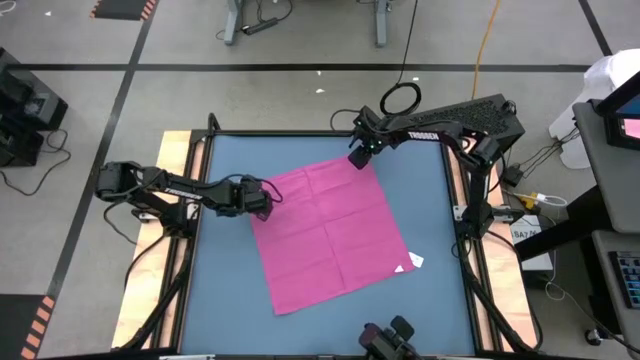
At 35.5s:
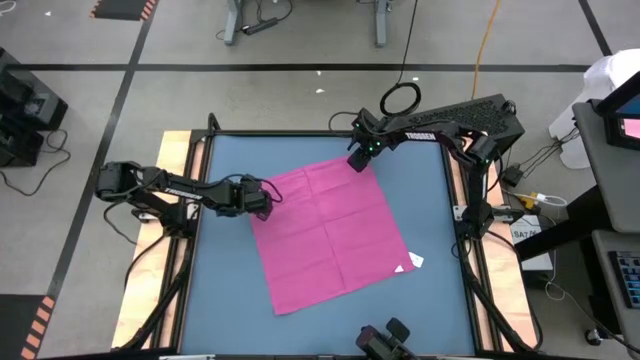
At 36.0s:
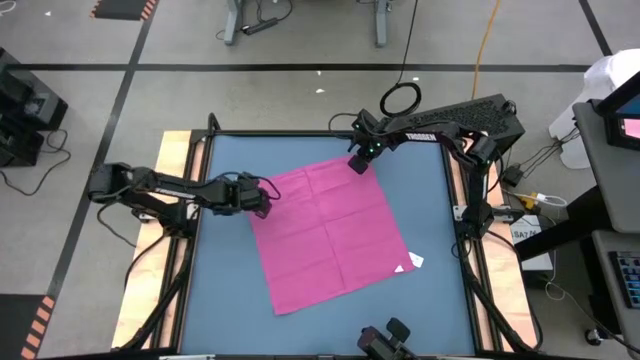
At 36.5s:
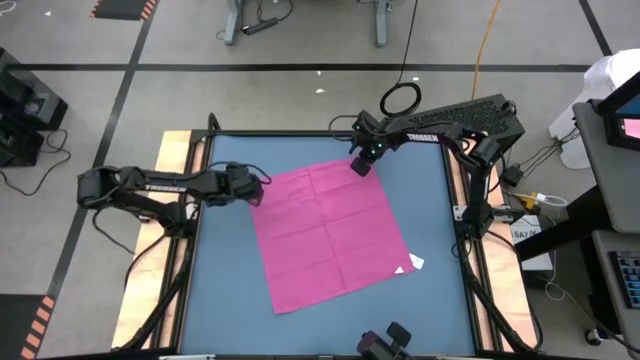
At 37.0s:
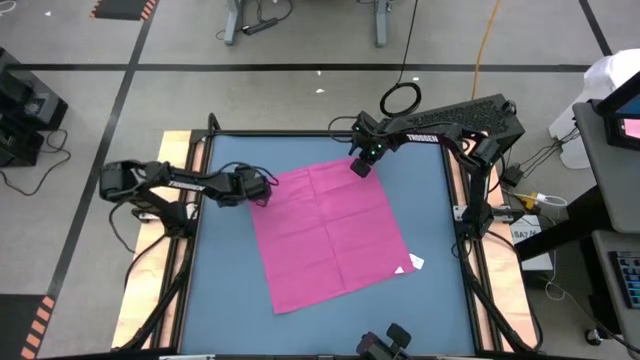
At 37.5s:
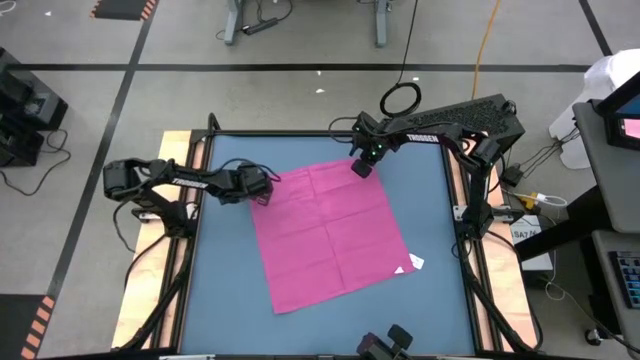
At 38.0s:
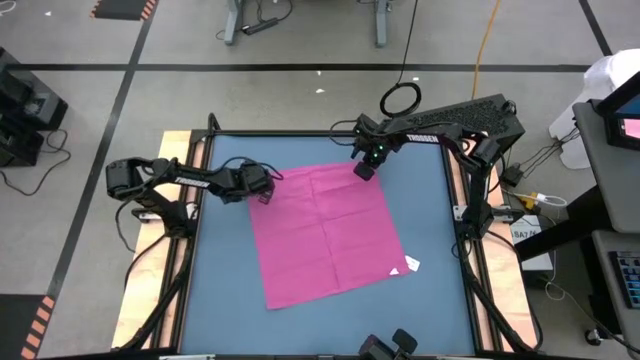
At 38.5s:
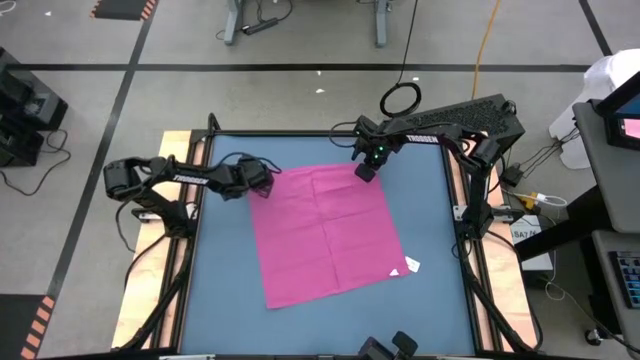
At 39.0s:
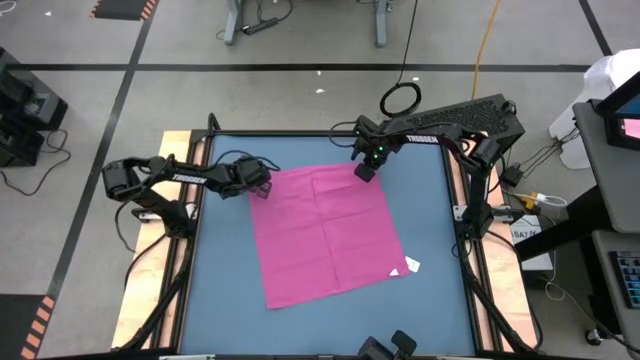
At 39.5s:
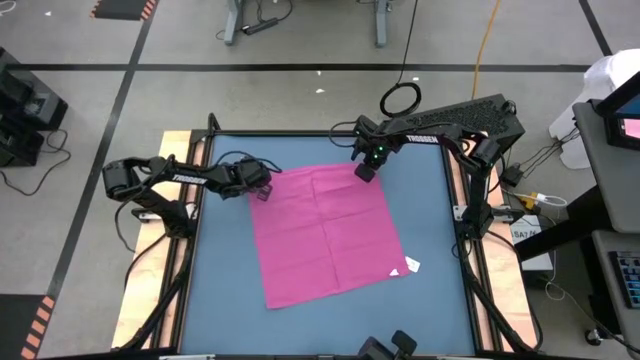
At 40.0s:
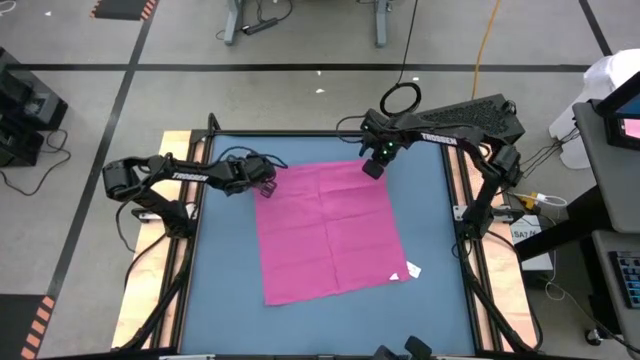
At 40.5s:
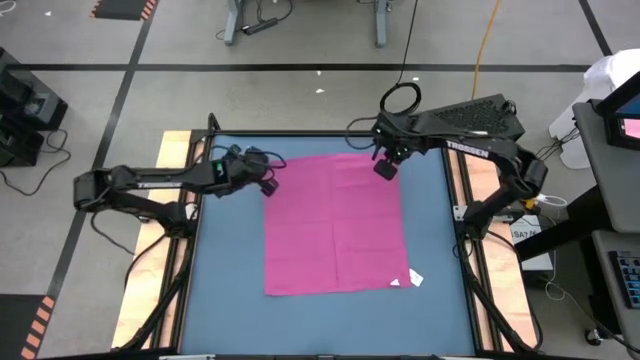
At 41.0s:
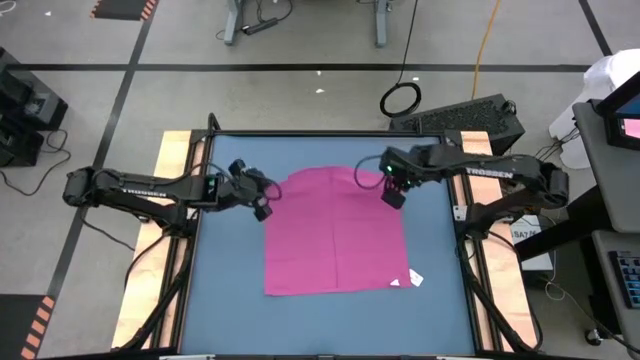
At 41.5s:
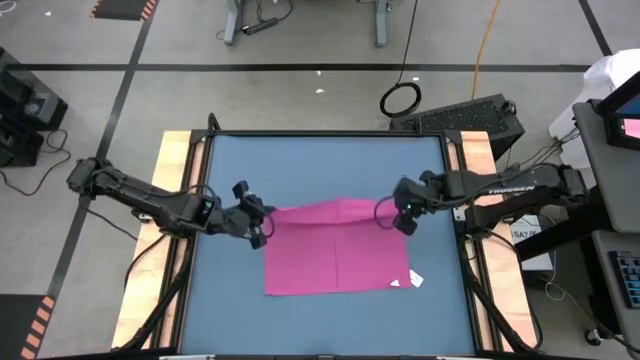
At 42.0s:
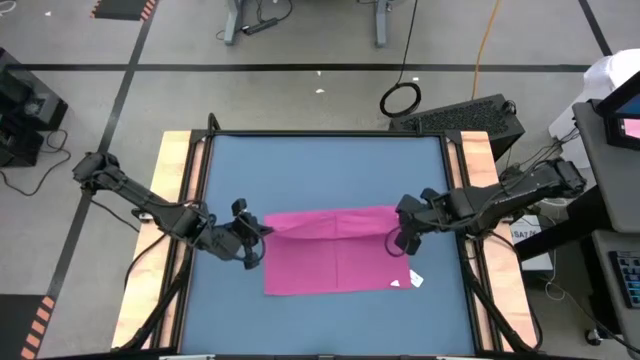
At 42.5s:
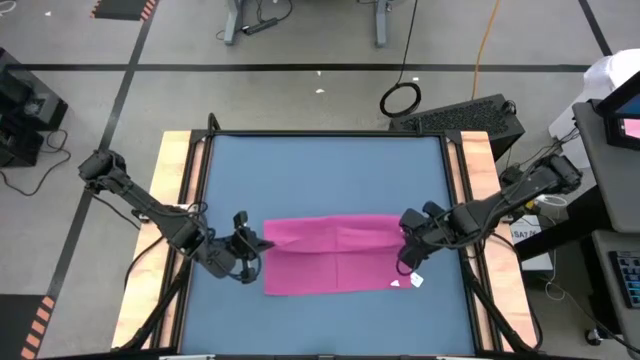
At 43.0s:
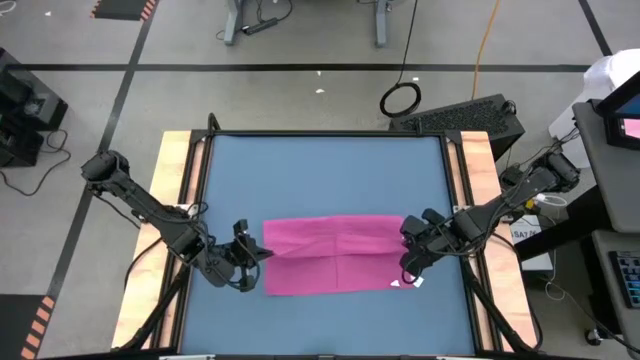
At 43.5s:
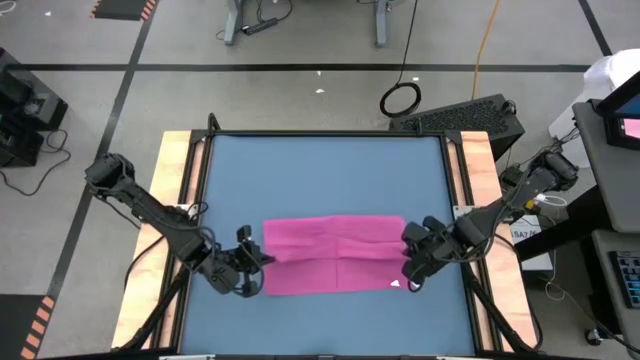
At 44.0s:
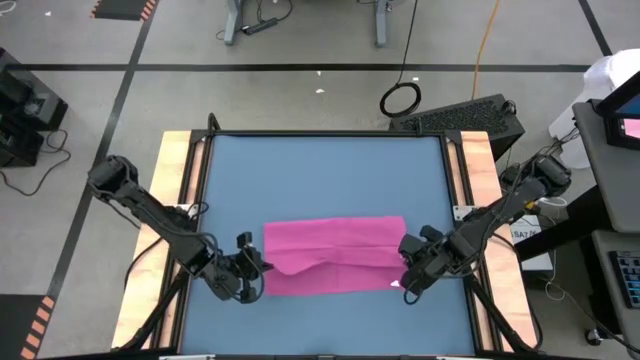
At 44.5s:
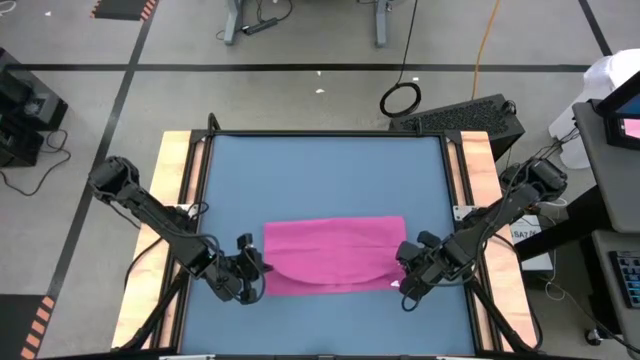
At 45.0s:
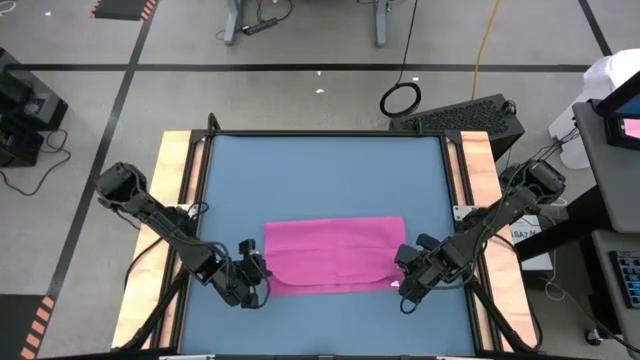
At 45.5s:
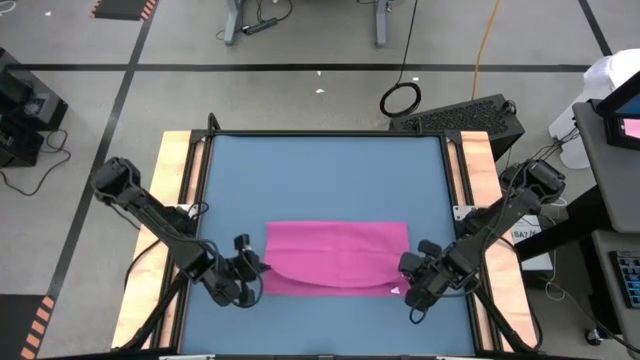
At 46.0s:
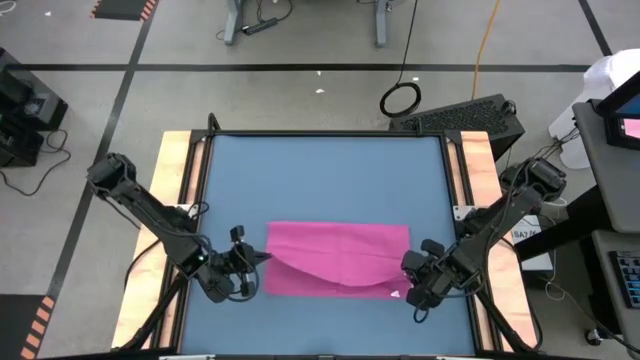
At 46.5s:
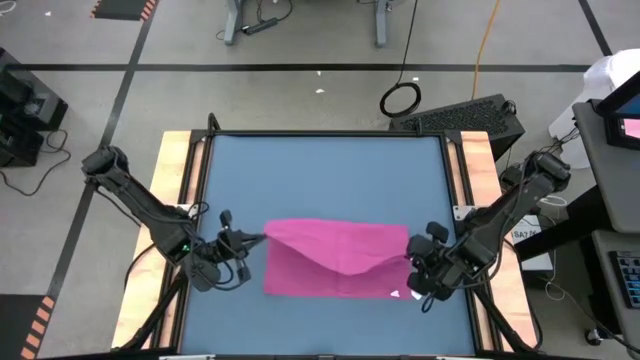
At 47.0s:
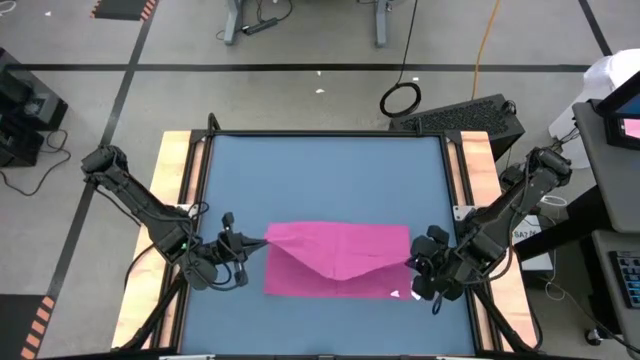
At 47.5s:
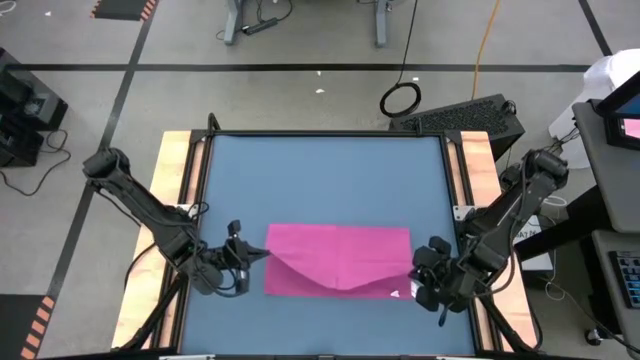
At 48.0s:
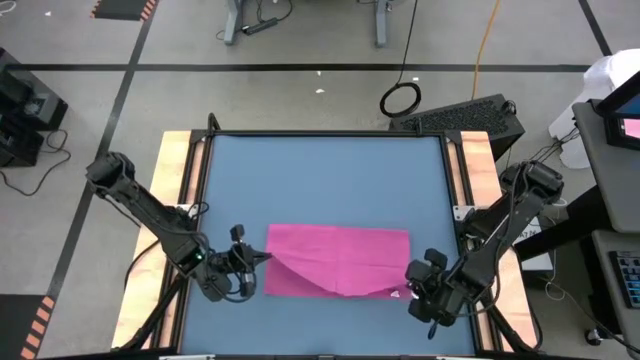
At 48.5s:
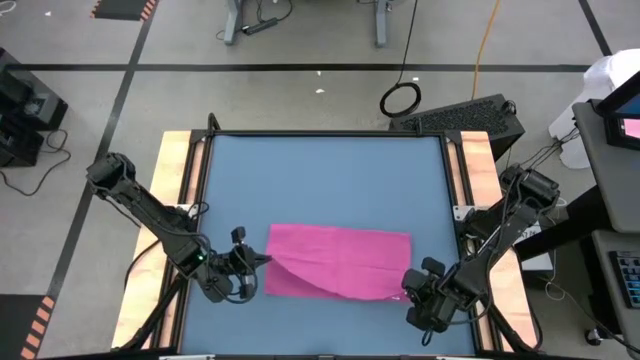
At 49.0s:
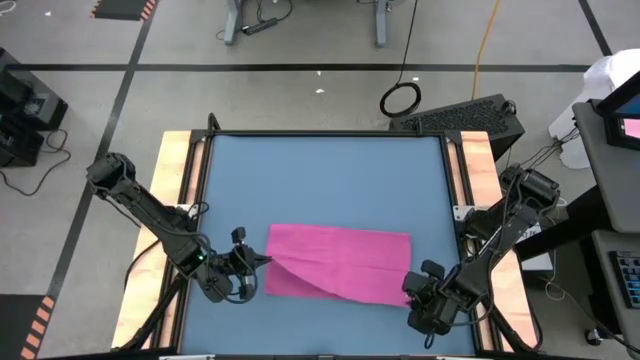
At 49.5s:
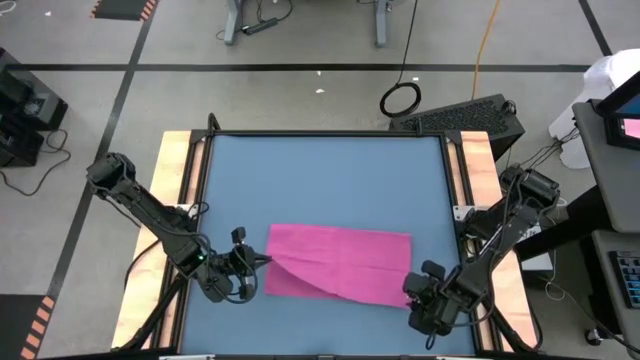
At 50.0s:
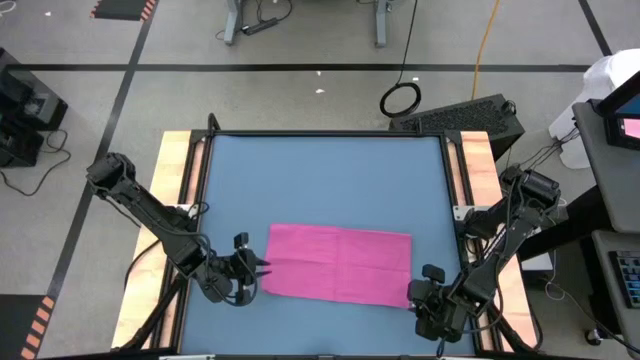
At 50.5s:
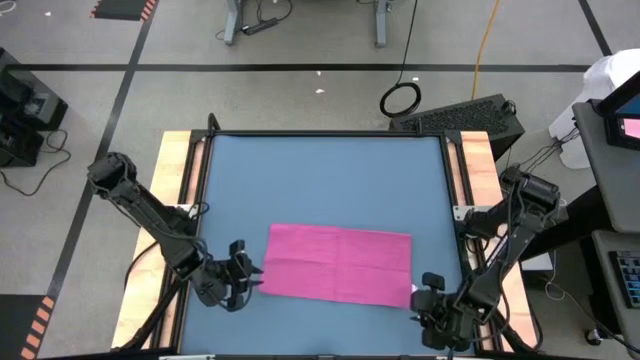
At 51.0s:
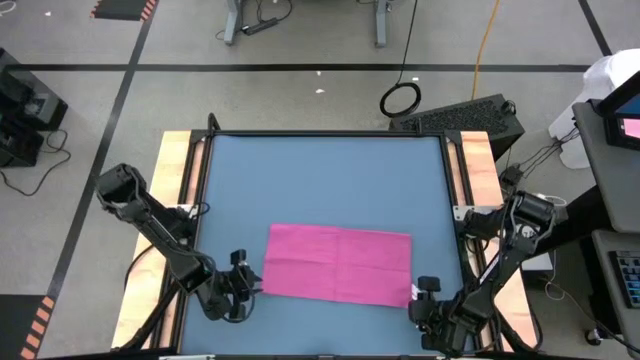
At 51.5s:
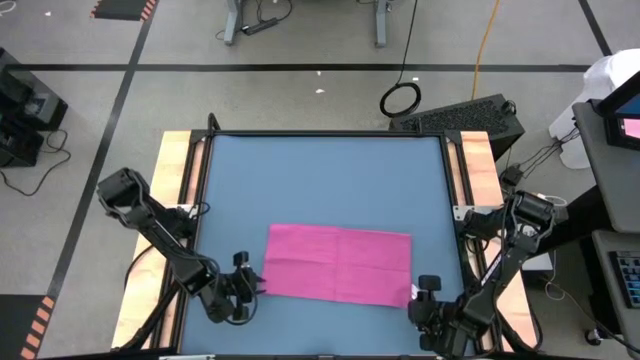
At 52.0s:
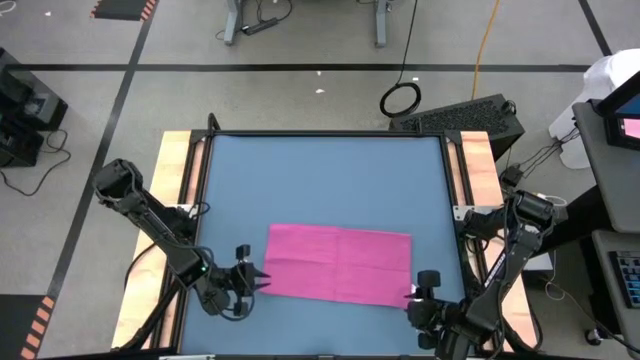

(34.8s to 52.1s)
Task: Roll towel into tight, uniform cylinder
Fold the pink towel

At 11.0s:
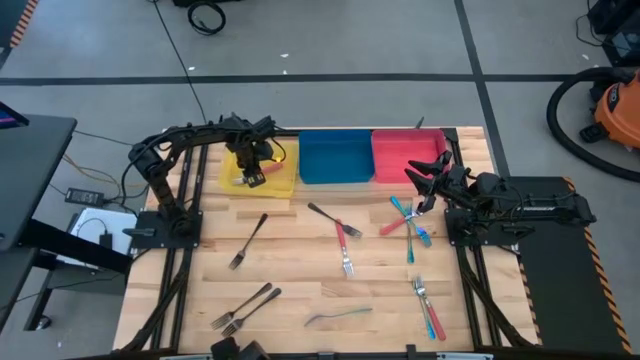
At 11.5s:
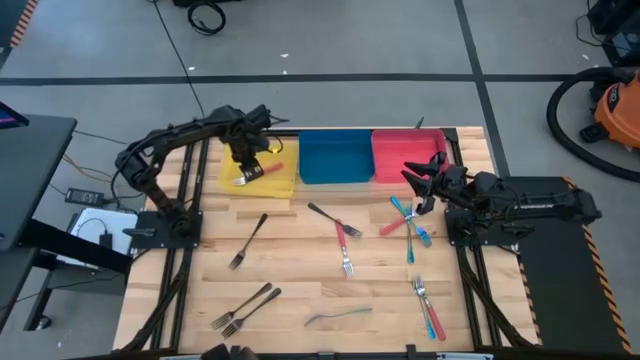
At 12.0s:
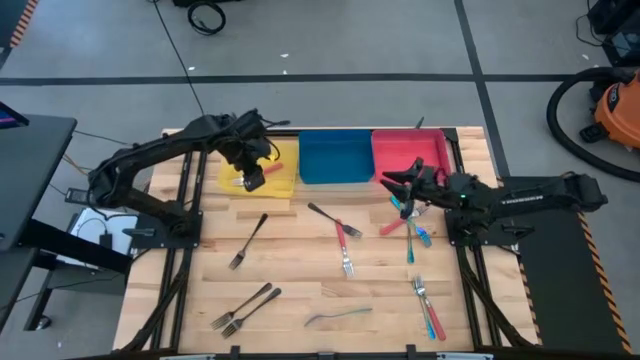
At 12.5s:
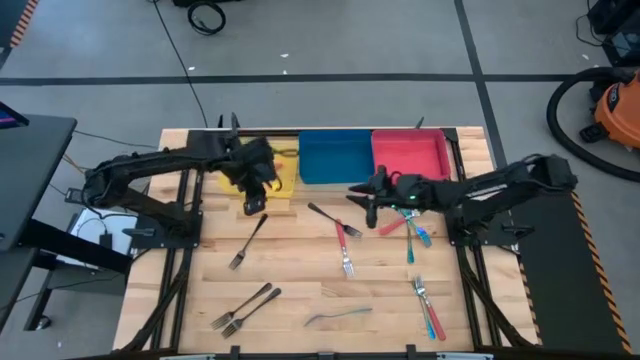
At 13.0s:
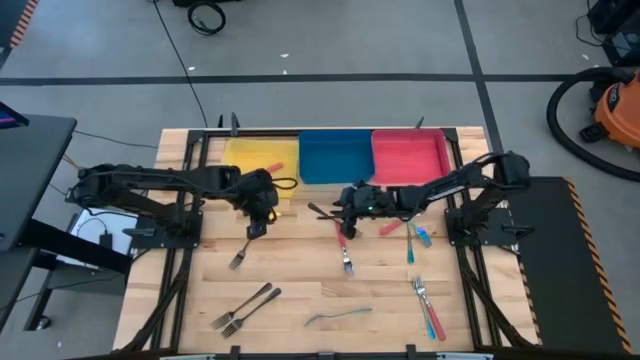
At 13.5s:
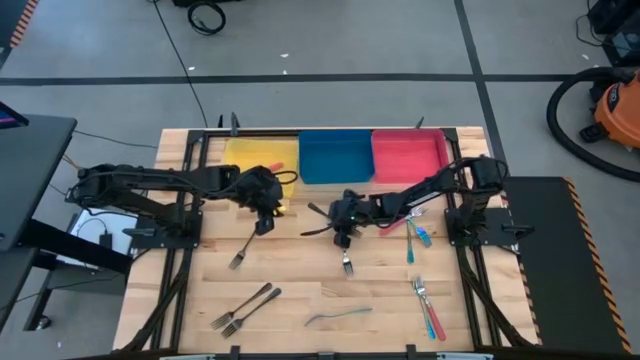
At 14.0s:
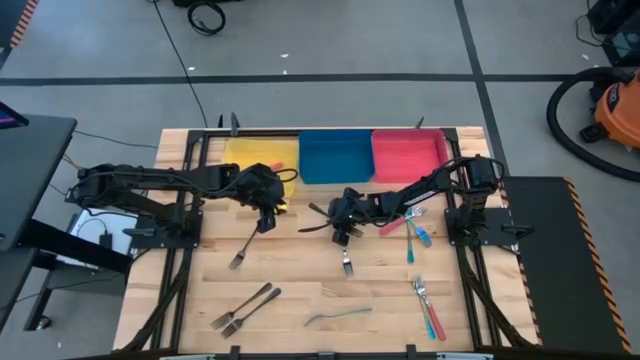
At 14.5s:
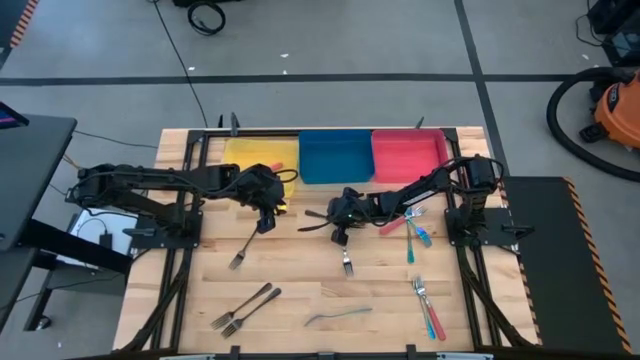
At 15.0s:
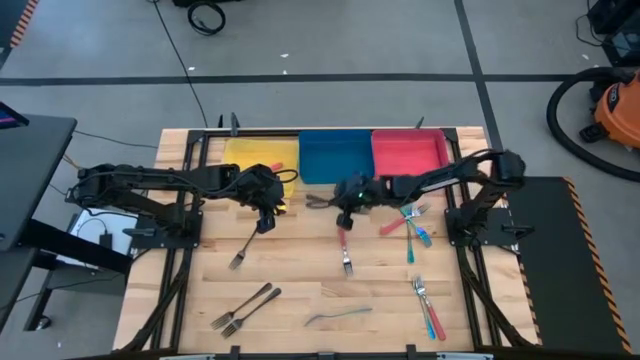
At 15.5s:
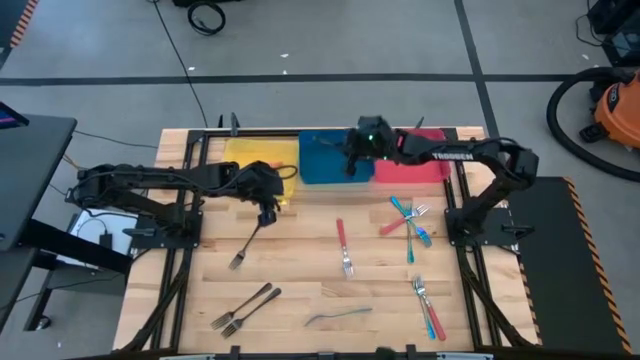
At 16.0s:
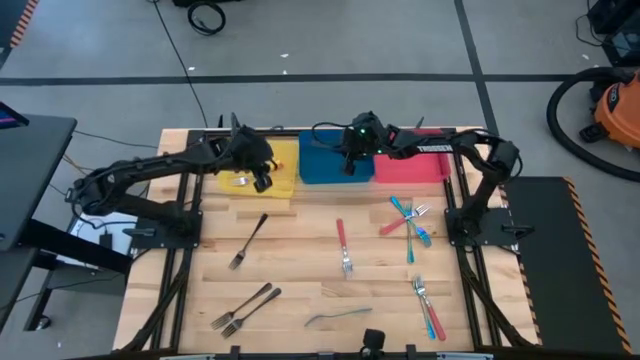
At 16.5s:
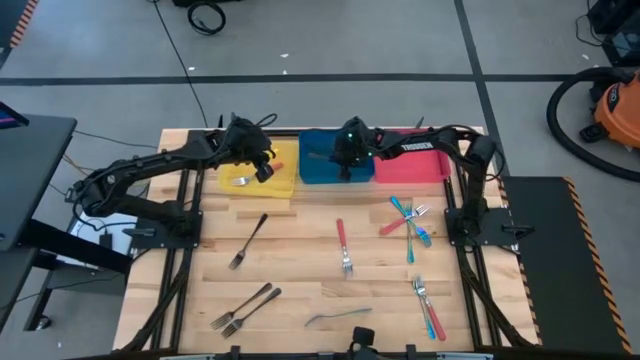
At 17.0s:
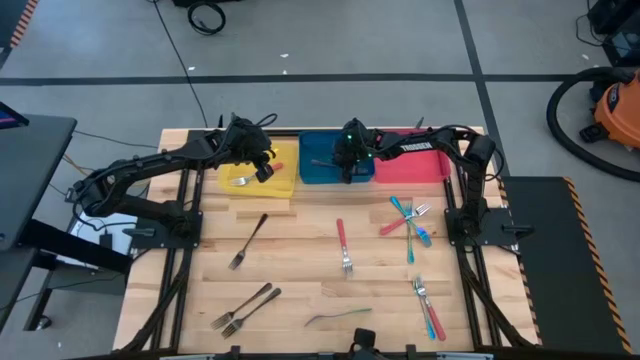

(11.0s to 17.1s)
Task: Sort silverware by color (type)
Put the top right black fork into the blue bin
